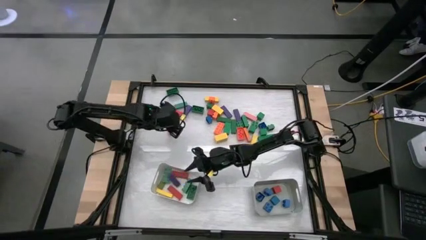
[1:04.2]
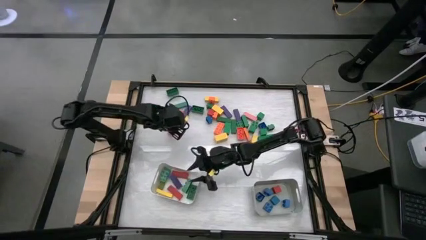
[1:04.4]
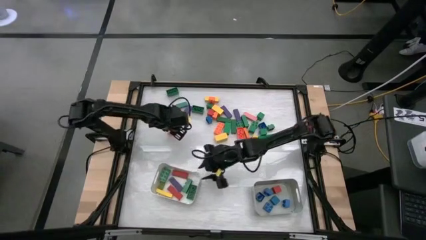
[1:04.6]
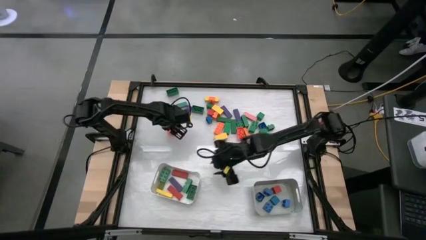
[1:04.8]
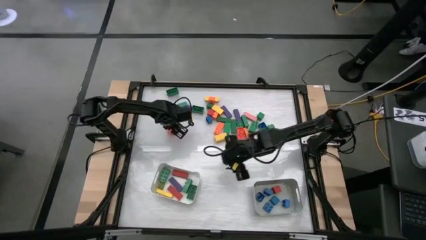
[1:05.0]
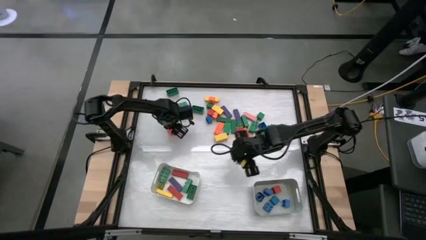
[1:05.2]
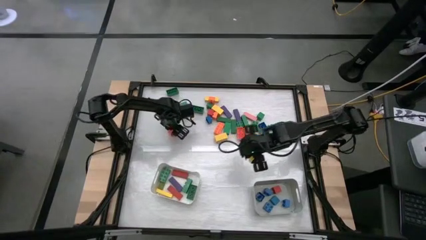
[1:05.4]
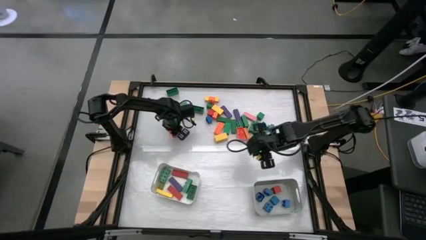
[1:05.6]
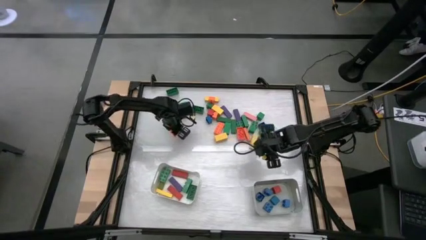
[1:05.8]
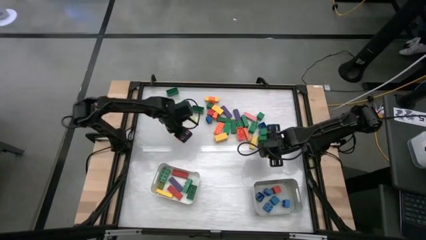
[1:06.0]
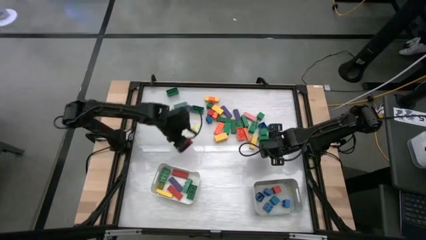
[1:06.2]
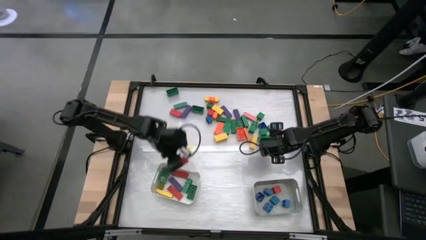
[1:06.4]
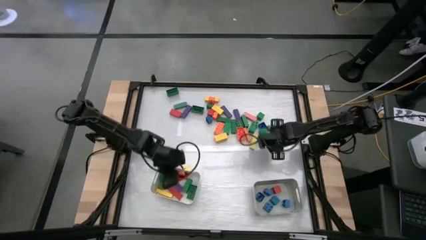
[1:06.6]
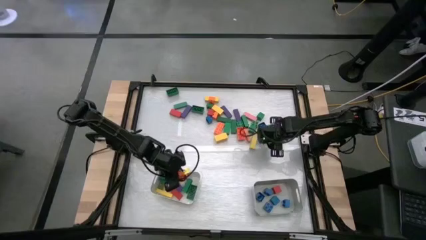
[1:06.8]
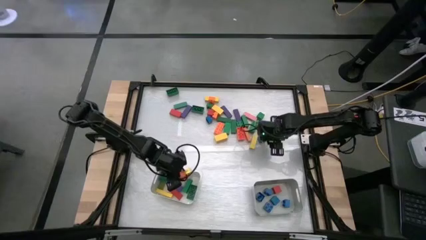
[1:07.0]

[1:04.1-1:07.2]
Task: Sort blocks by size
Put the rectangular orange game piece into the white bin

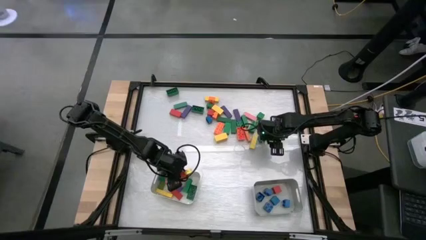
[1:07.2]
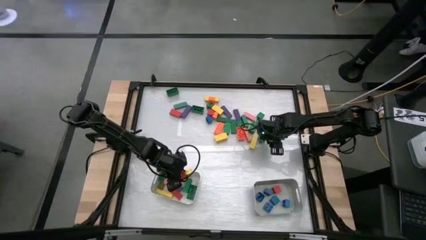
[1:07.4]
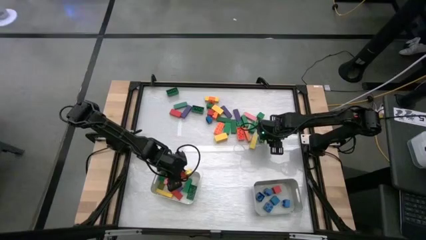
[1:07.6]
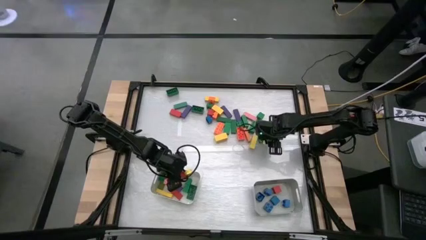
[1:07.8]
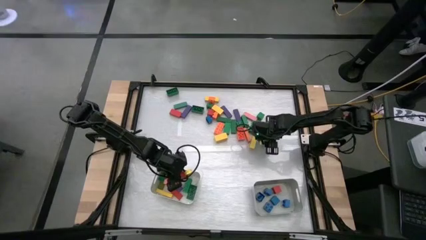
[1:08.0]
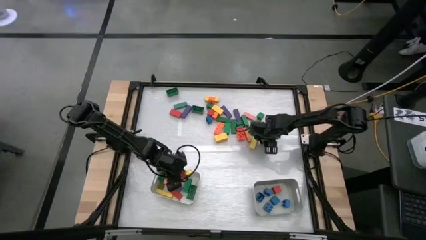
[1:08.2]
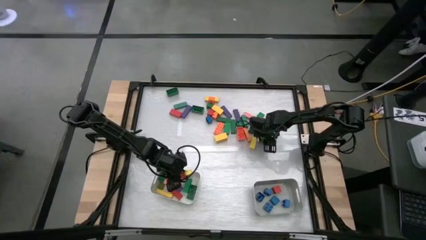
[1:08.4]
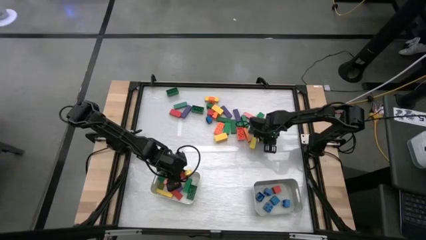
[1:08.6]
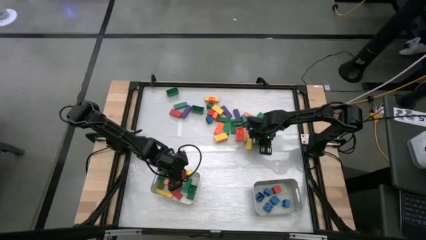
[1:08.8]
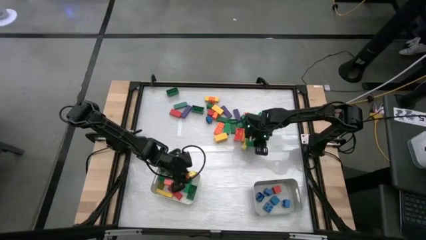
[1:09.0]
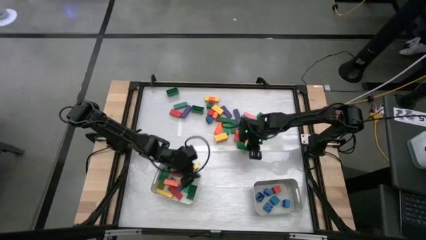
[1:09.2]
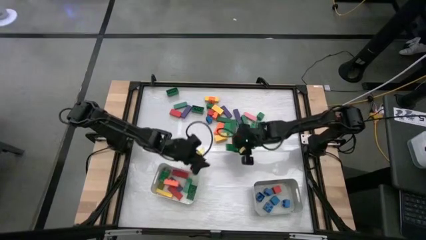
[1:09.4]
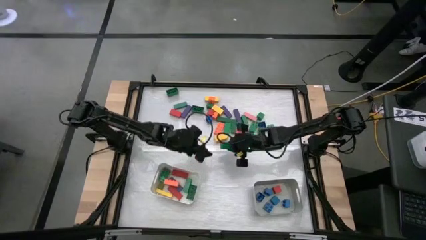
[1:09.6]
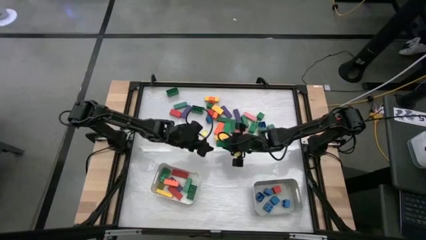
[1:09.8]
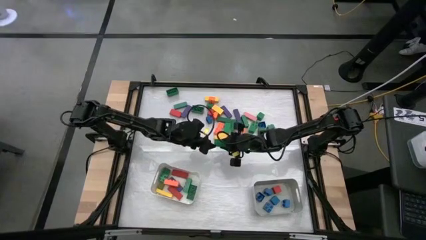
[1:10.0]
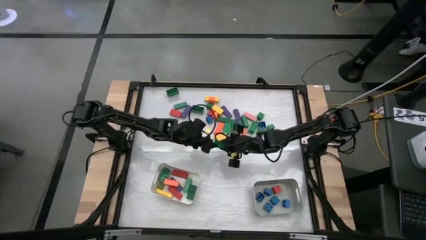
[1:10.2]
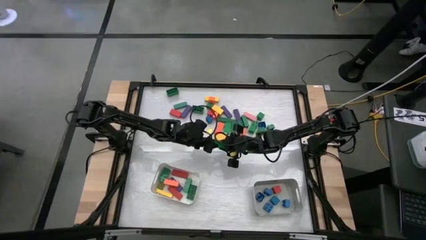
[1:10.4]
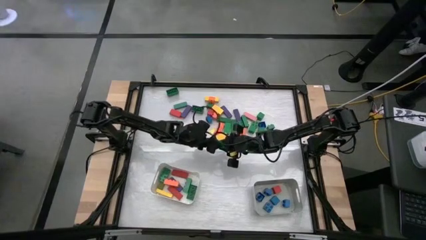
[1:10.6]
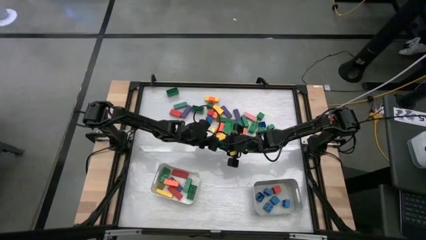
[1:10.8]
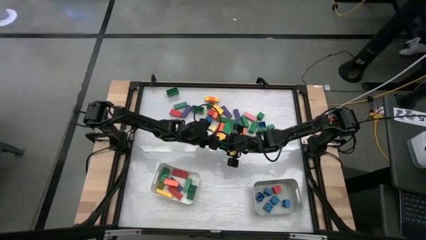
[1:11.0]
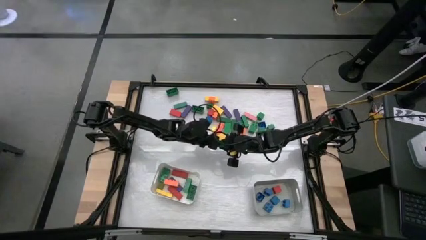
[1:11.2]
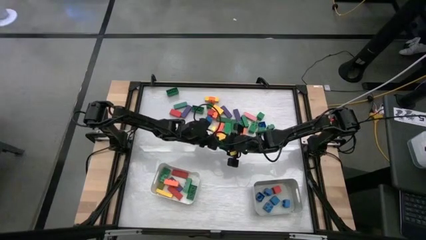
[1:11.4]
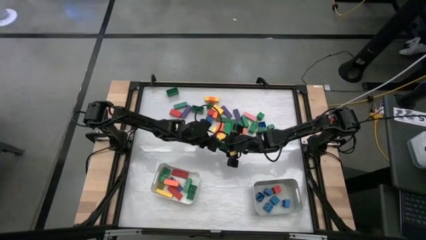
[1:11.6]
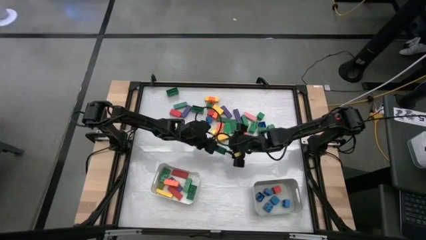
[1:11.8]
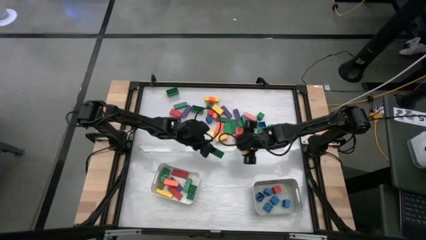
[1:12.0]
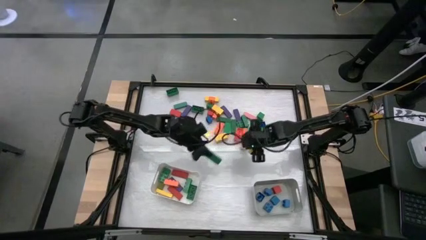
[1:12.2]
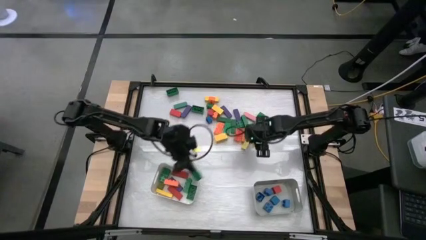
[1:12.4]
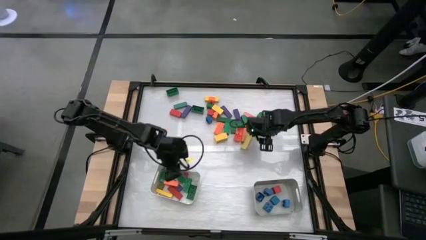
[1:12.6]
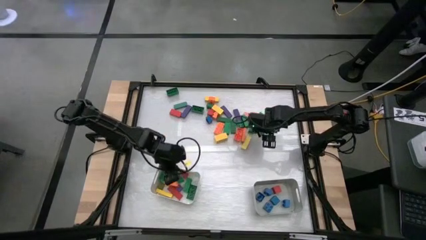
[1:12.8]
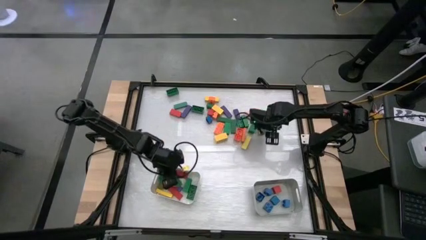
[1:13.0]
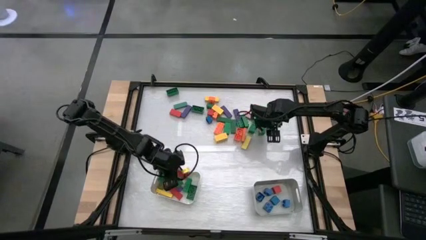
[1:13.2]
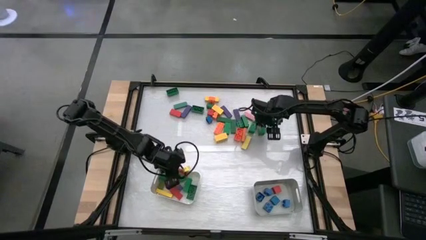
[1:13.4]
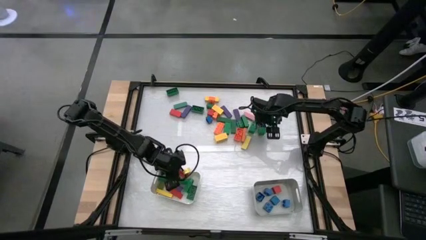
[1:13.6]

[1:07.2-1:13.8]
Put the rectangular green block into the white bin

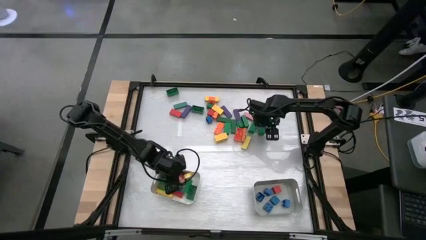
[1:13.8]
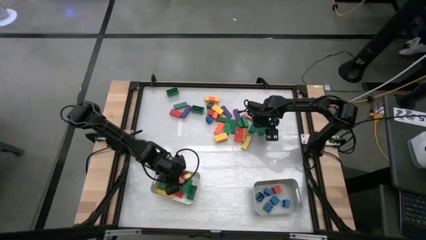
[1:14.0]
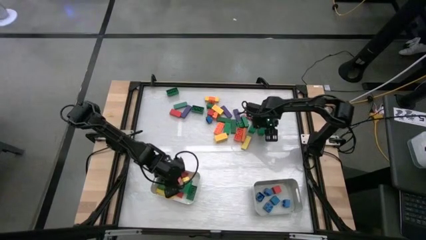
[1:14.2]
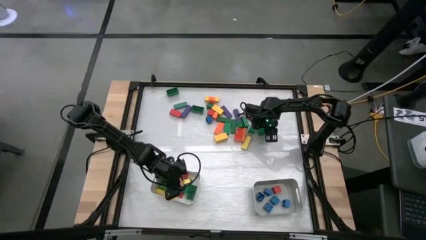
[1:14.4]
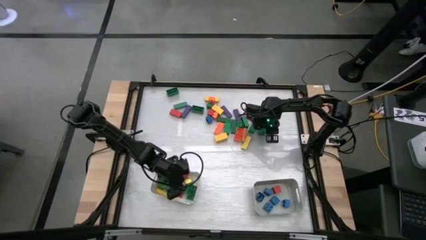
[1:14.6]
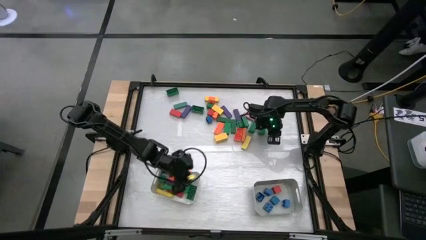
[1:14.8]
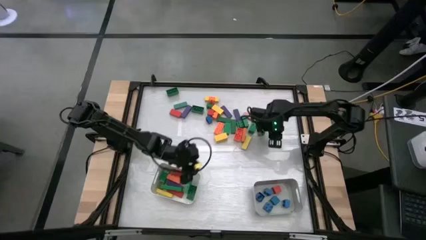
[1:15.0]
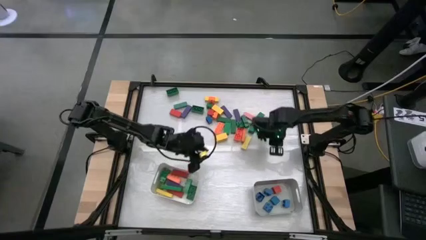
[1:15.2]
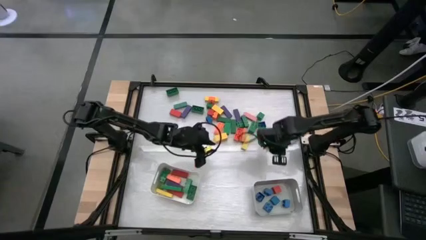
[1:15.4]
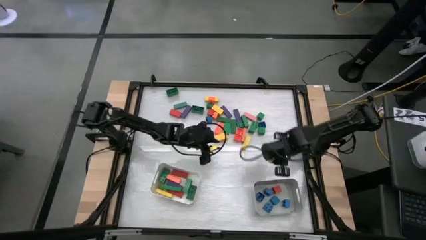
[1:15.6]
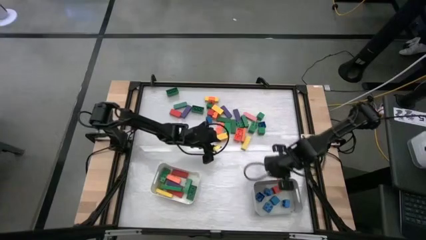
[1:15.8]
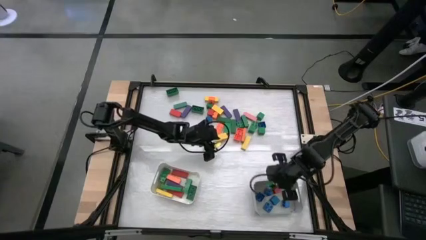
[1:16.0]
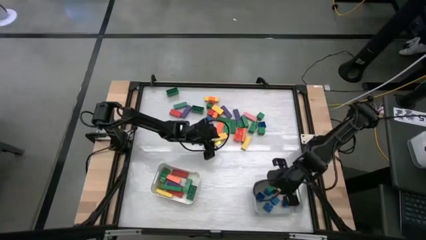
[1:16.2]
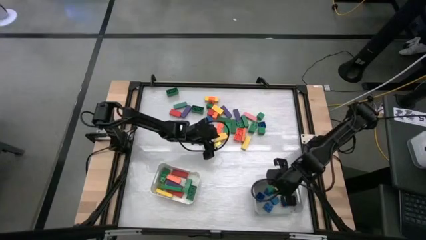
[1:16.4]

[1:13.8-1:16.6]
Put the square green game piece into the gray bin

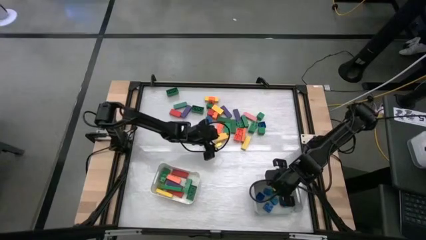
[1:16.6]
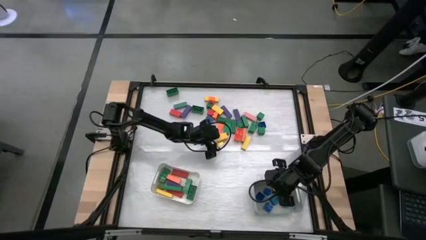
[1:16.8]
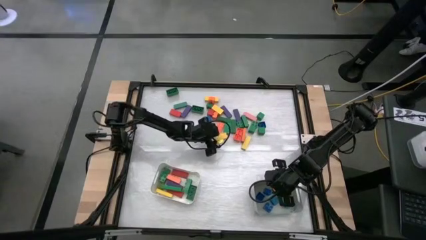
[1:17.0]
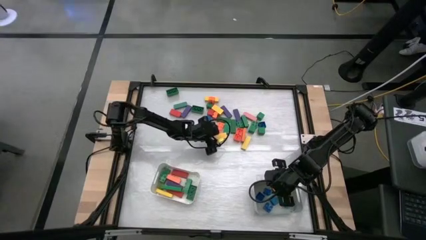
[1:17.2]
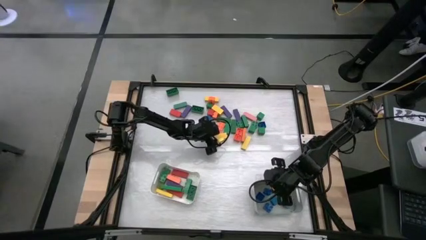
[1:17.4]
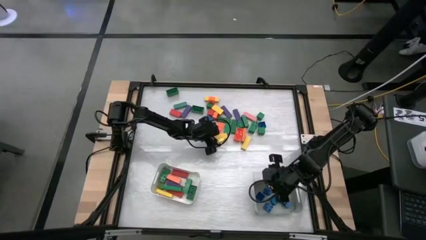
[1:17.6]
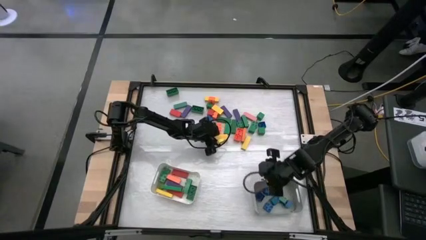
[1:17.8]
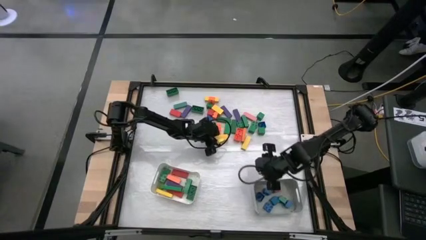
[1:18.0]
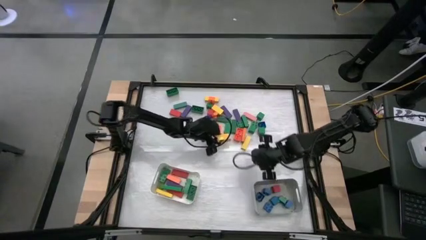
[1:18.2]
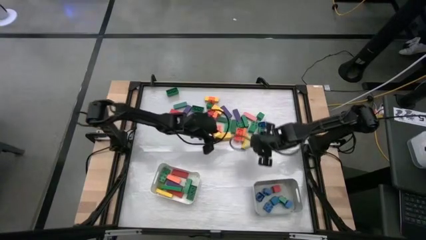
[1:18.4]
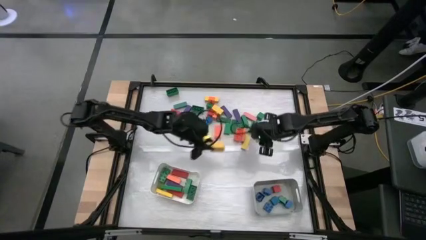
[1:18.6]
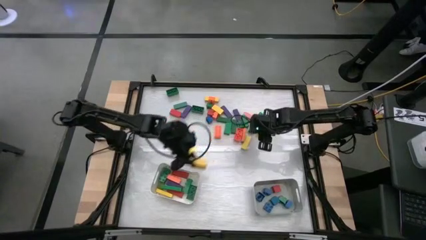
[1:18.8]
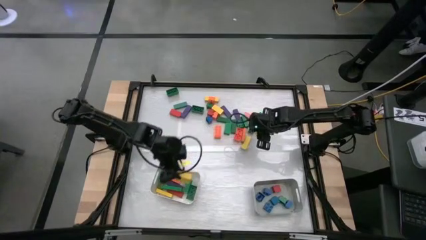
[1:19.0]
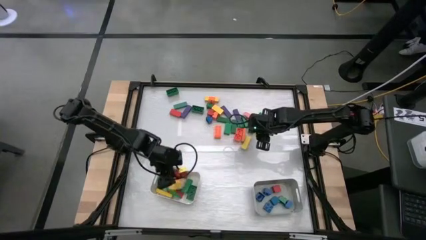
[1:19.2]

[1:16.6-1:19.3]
Put the rectangular yellow block into the white bin

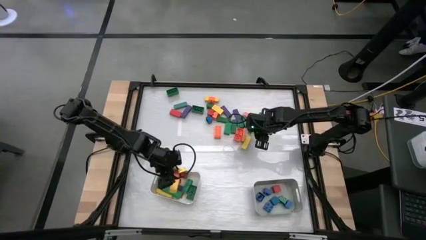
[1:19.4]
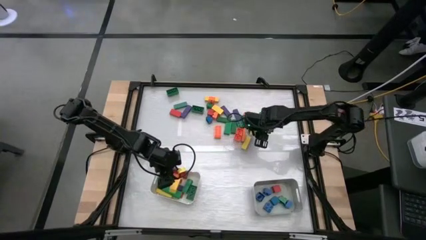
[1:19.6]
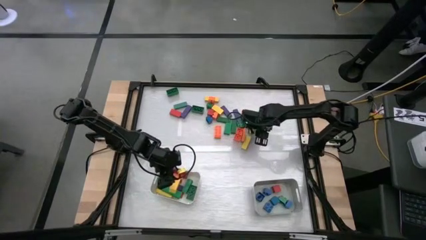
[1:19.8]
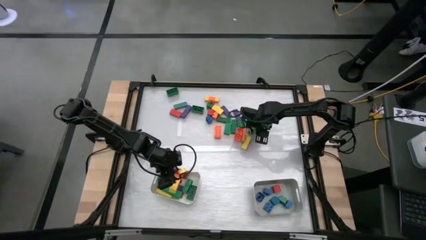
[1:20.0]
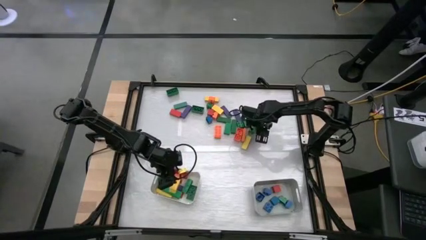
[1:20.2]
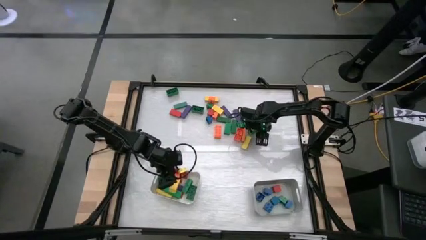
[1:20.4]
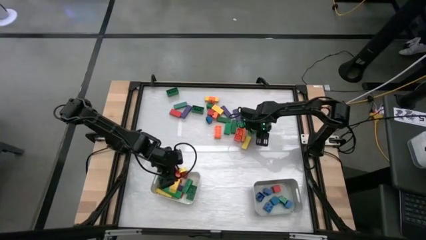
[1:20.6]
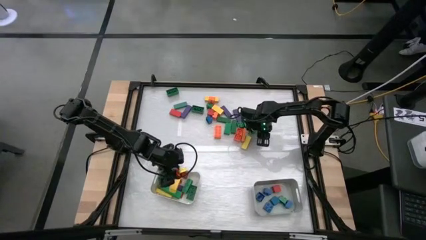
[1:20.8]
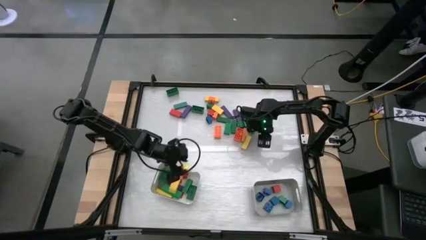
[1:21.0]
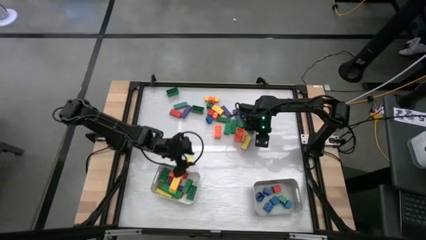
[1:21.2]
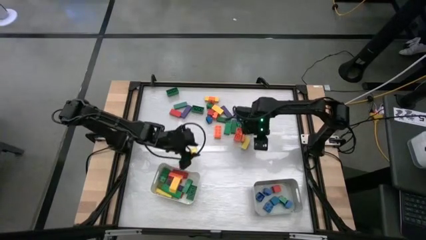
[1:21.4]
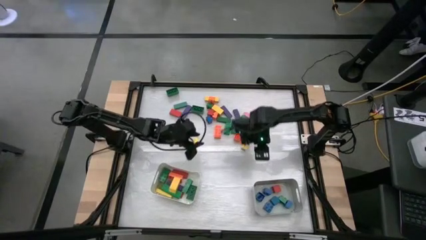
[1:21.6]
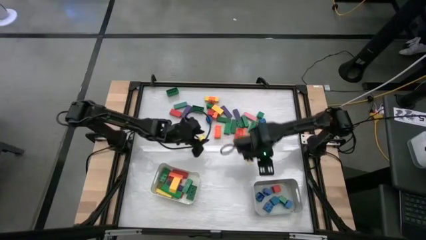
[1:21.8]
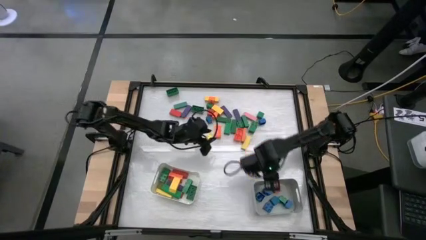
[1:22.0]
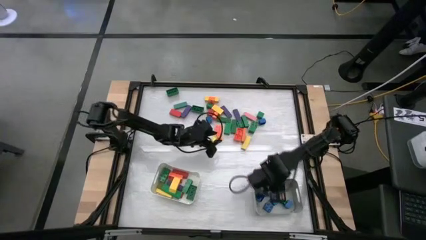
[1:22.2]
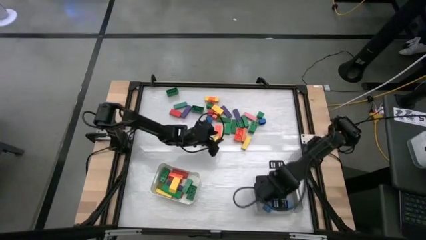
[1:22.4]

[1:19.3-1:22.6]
Put the square green block into the gray bin
